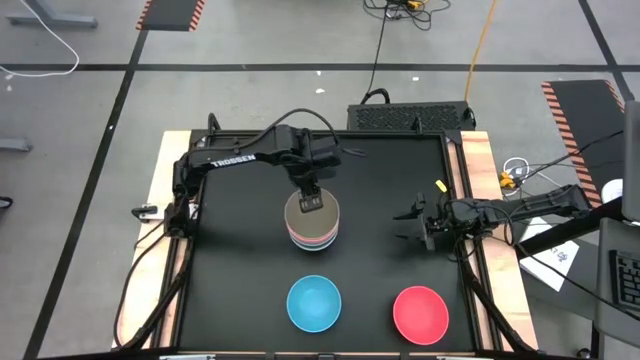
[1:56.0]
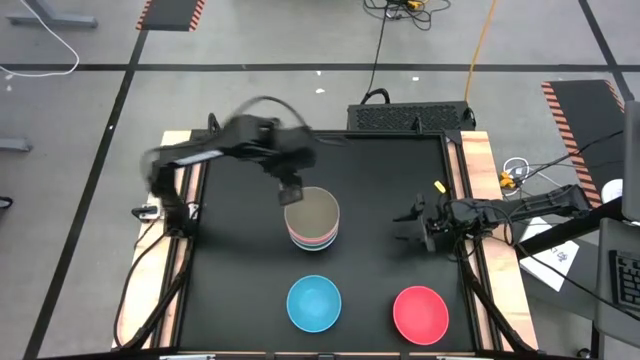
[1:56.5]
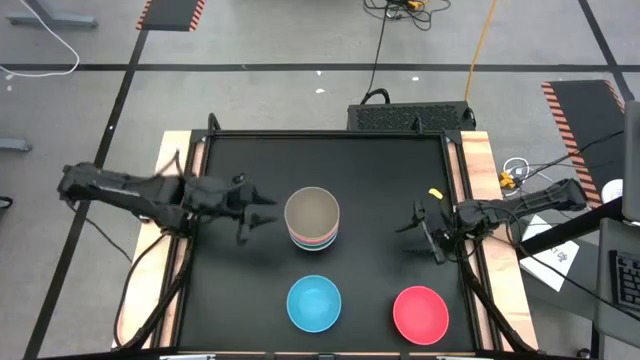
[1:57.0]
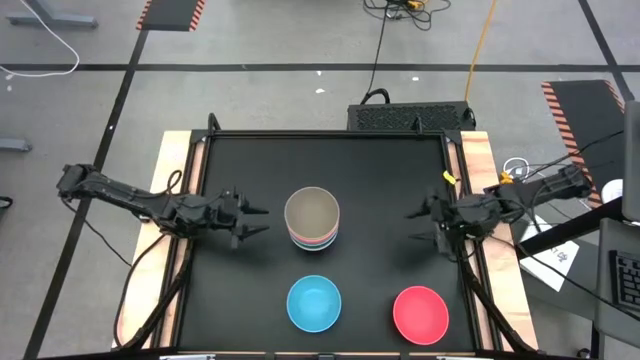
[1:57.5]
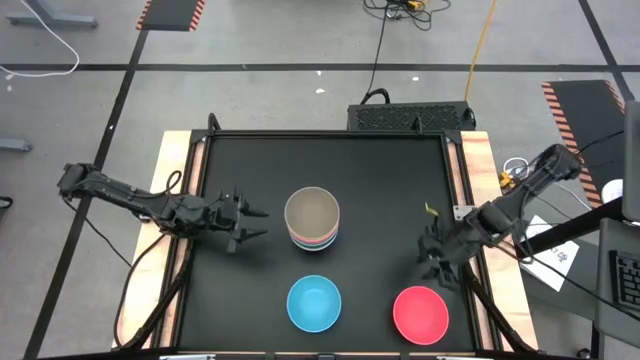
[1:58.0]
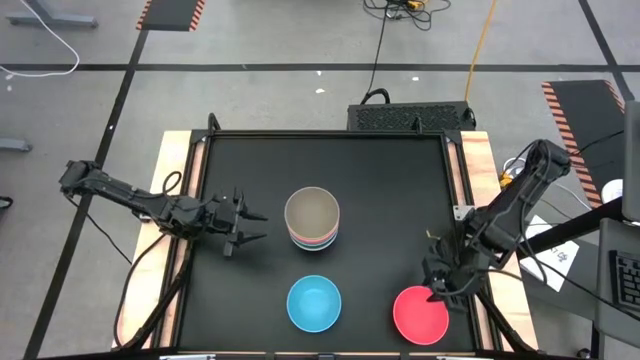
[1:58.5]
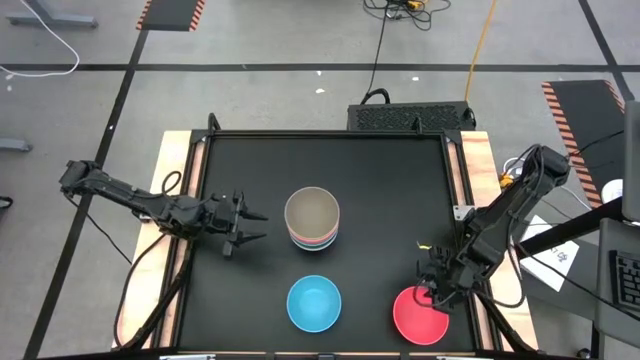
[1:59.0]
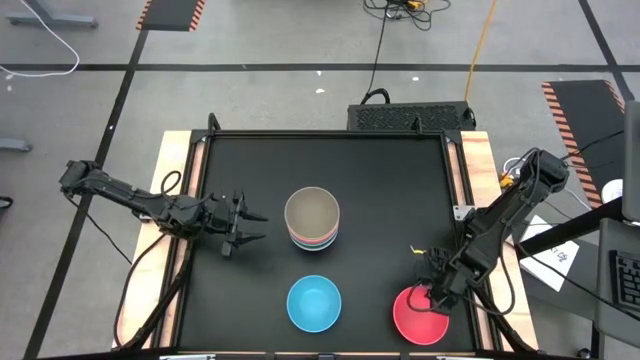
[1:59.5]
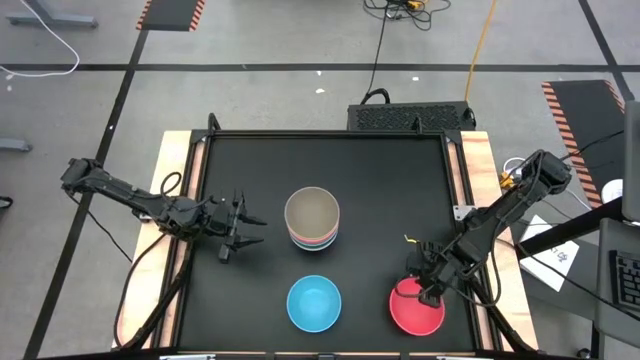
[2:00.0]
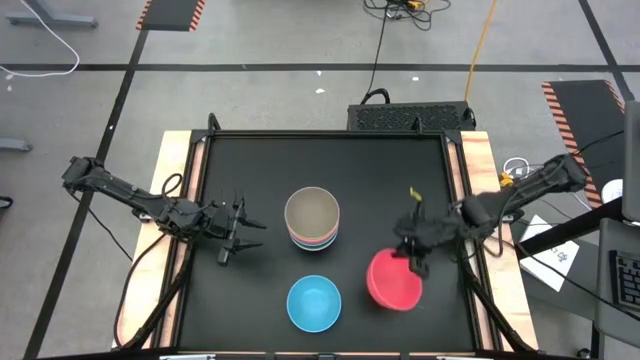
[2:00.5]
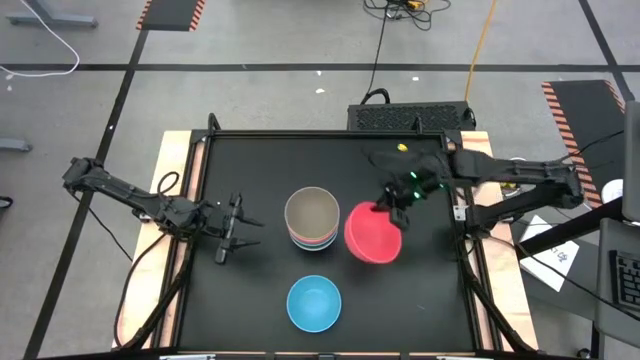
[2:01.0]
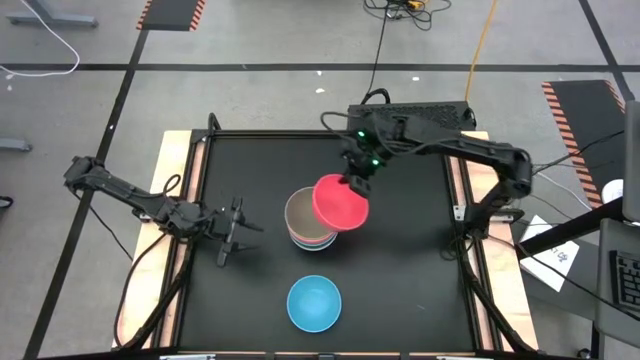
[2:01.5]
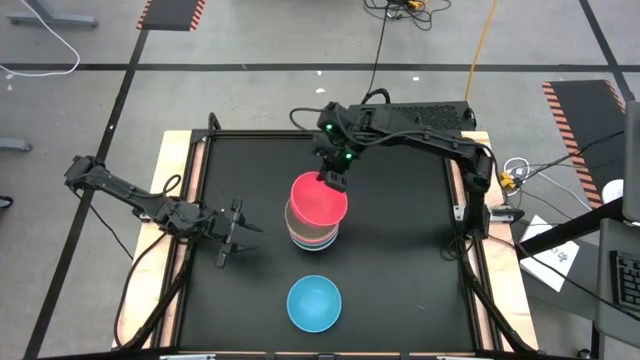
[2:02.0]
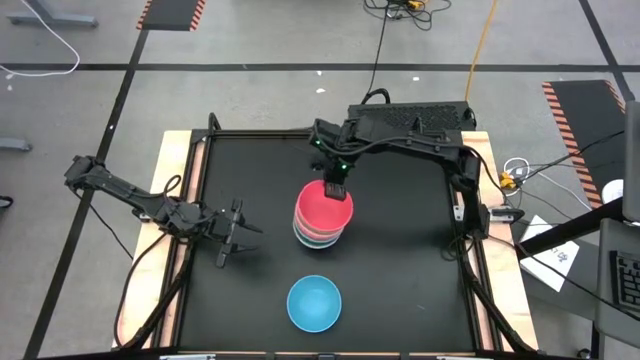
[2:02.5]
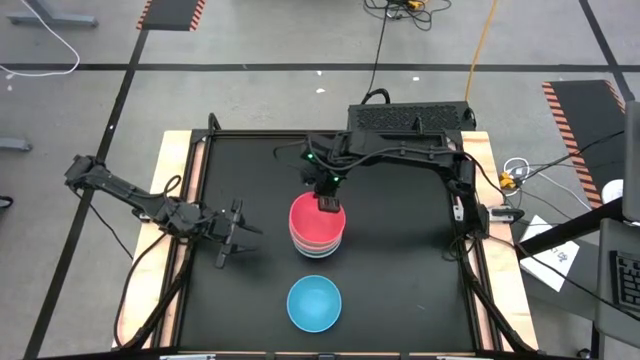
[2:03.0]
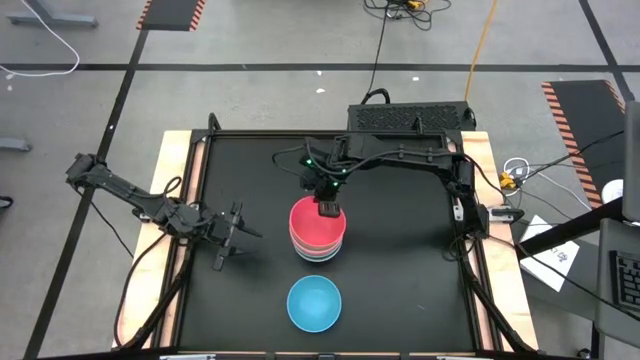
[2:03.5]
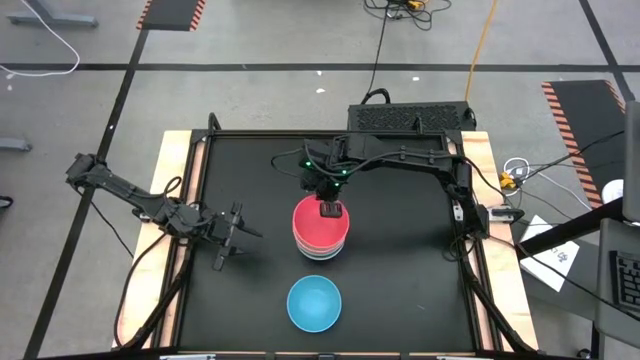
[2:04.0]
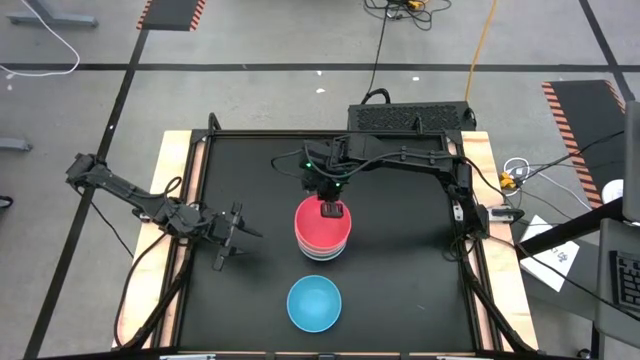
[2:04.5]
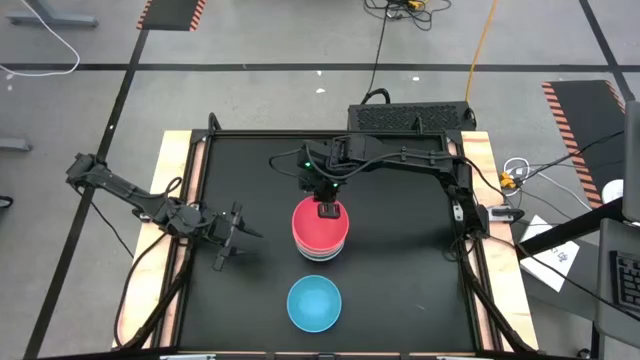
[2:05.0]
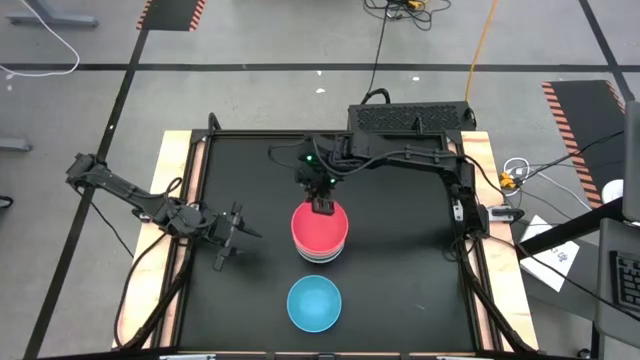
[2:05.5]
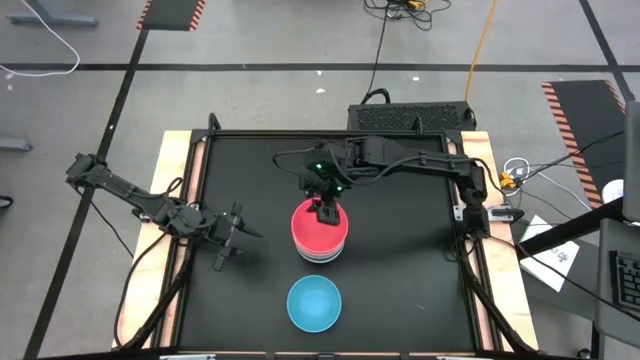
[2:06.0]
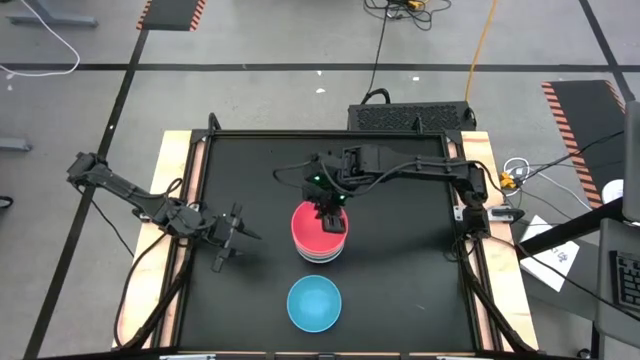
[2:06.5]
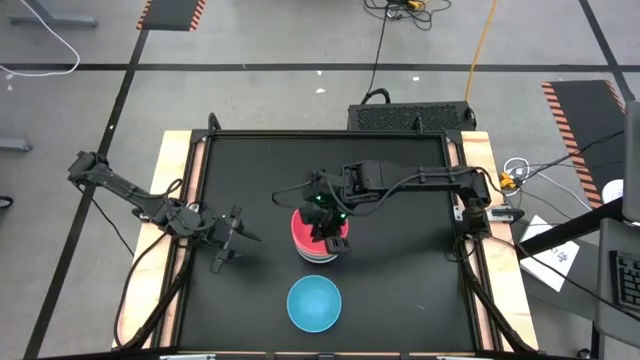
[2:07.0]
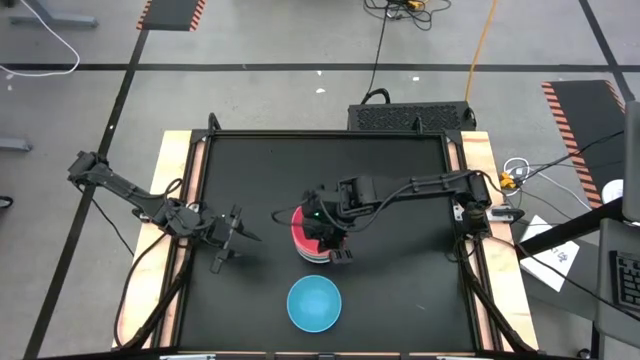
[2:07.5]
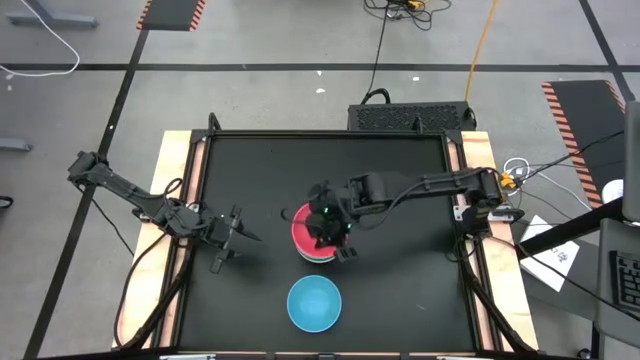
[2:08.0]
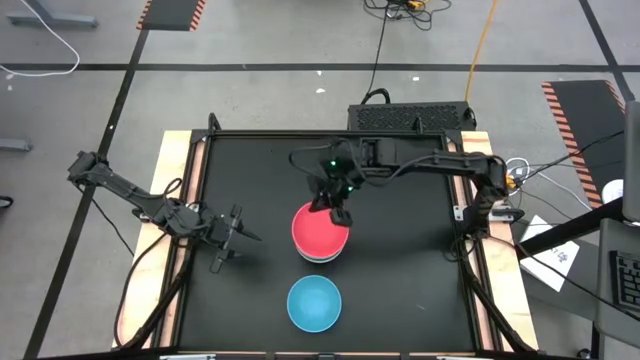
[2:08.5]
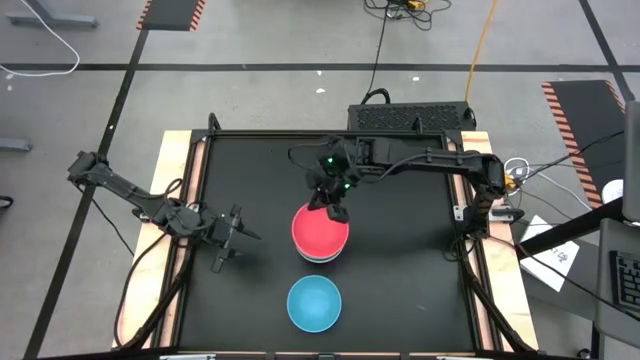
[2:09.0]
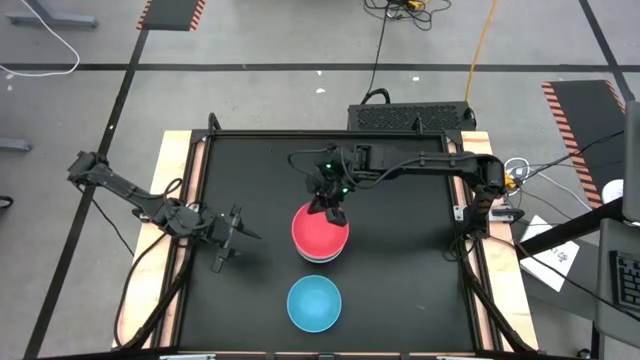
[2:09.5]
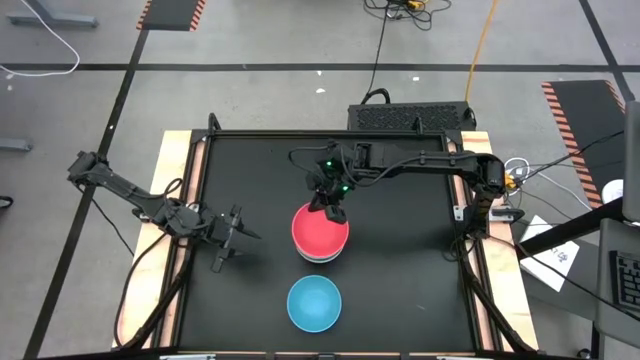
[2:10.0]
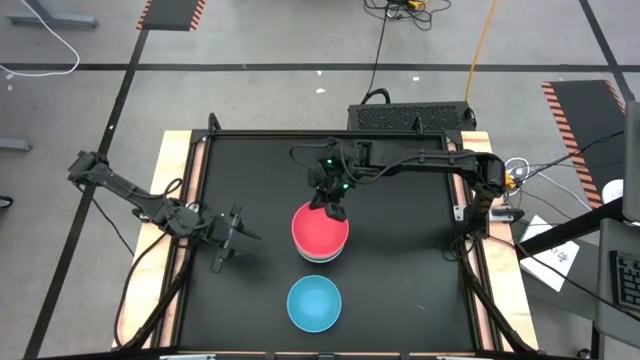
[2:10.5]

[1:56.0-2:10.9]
Task: Nest bowls inside each other
Stack the red bowl on the gray bowl

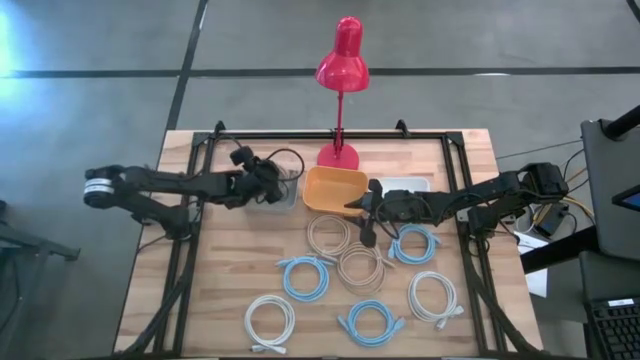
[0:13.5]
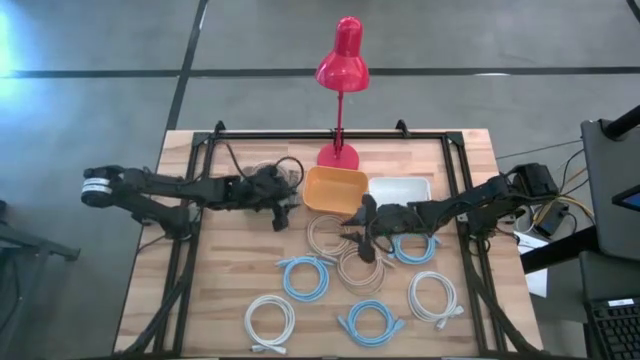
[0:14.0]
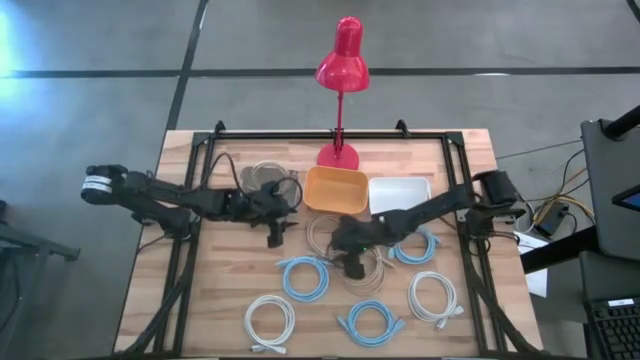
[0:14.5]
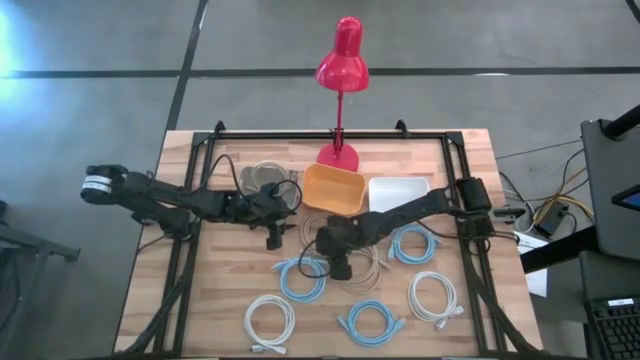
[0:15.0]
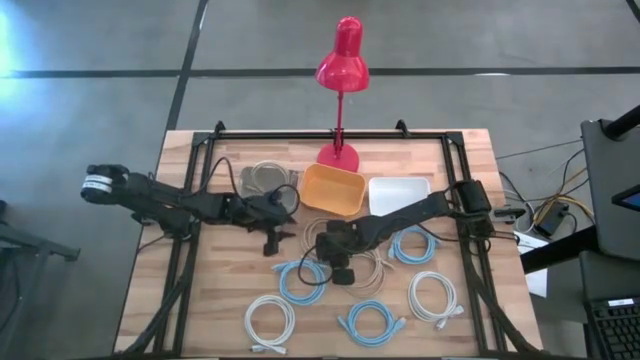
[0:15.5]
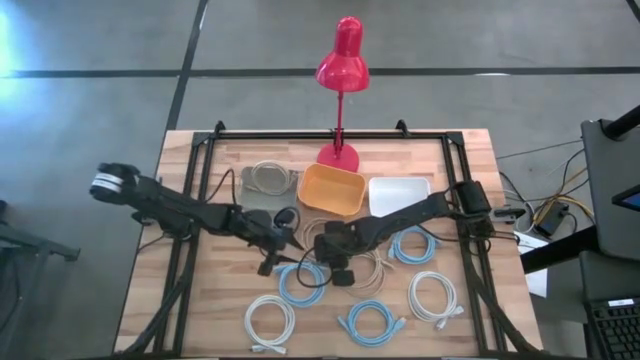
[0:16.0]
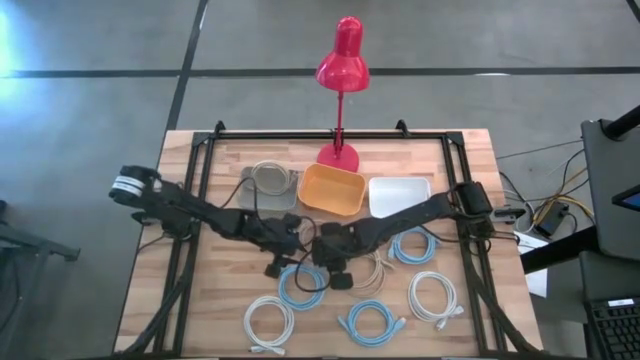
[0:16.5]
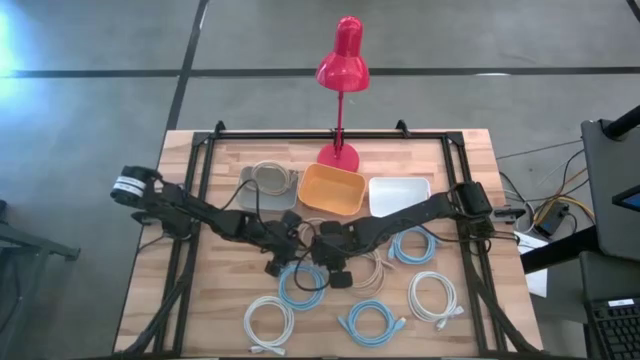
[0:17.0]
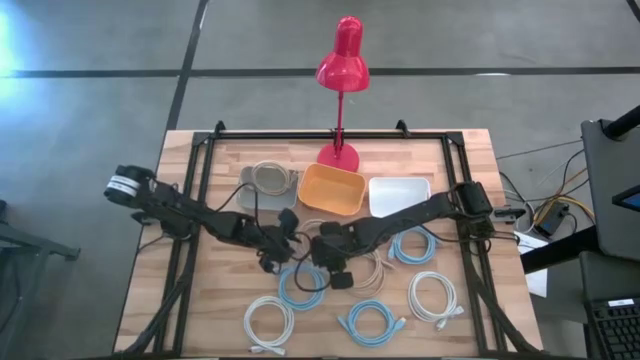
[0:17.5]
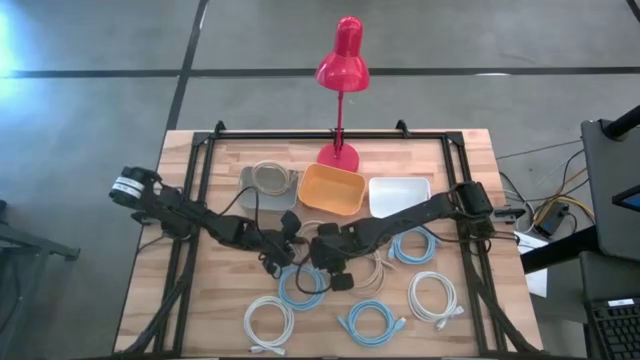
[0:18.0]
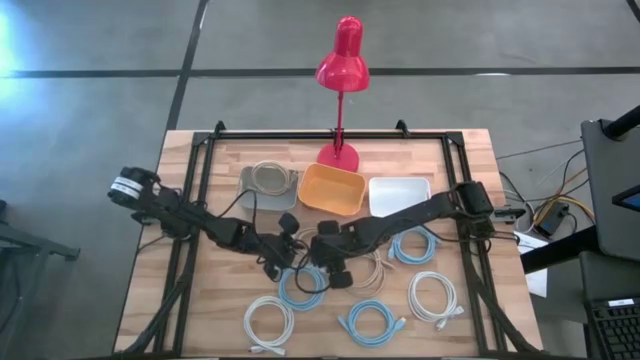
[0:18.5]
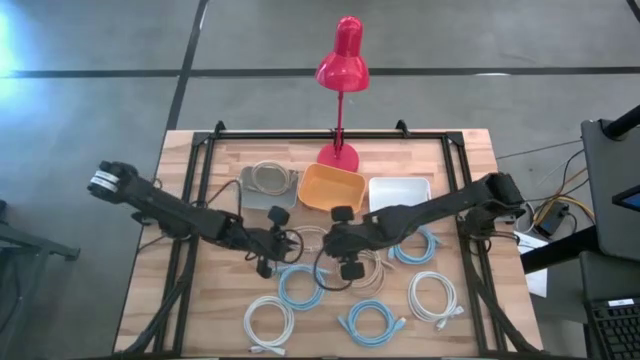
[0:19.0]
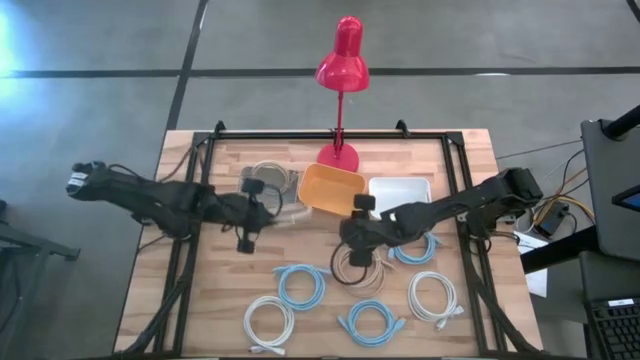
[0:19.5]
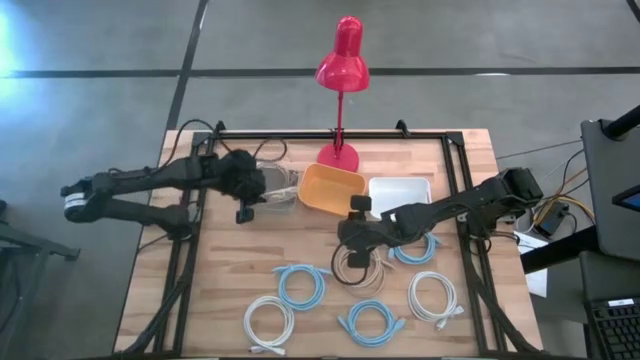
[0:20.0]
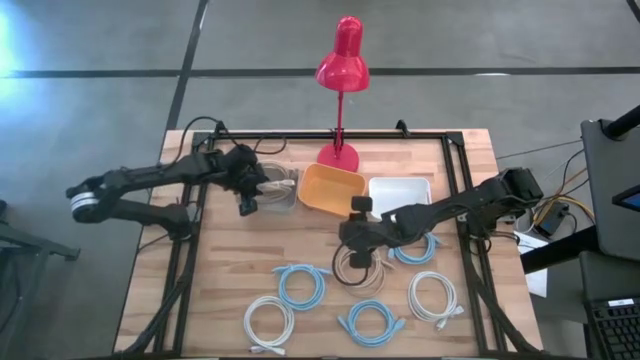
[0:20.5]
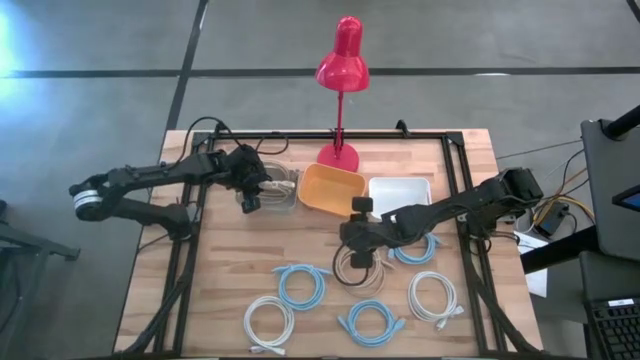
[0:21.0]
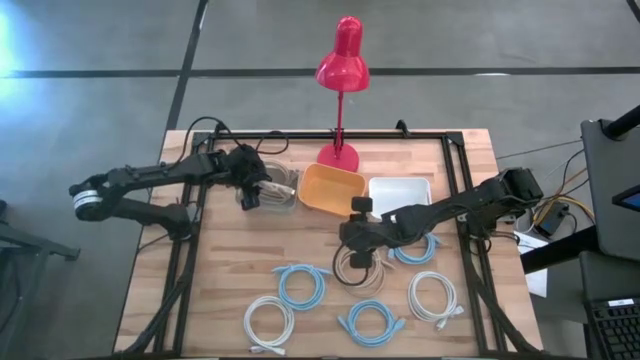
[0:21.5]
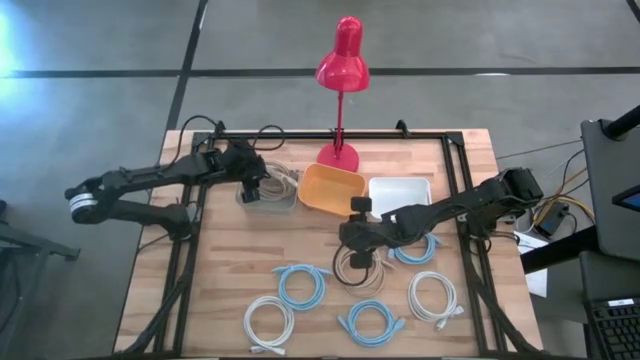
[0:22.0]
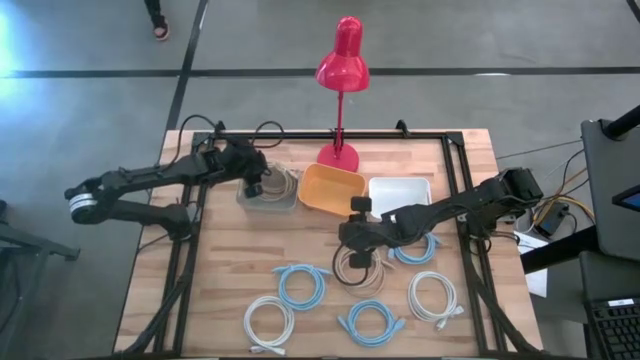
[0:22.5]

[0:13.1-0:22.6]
Task: Sort HDMI cables
Put the top brown hdmi cable into the gray bin
